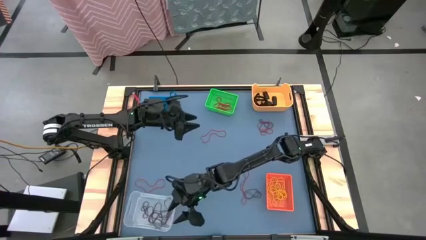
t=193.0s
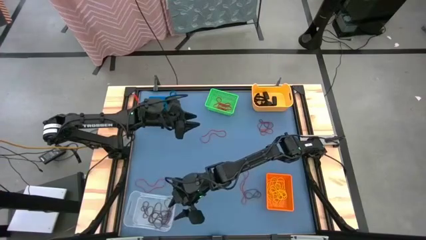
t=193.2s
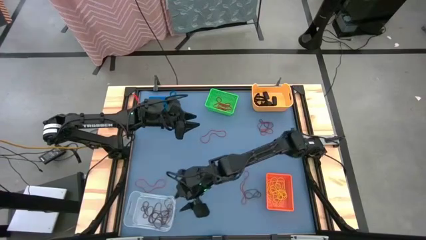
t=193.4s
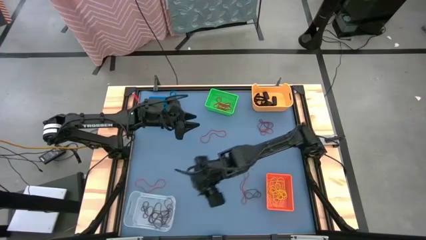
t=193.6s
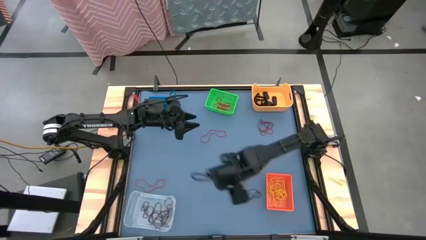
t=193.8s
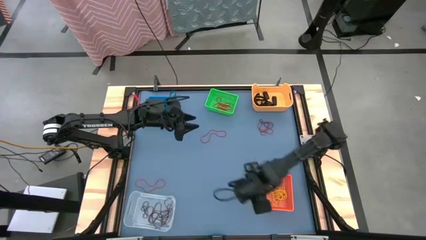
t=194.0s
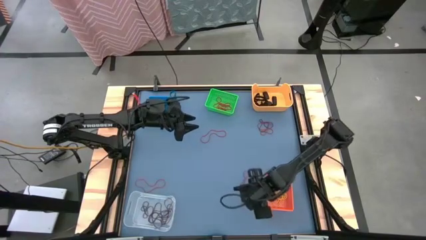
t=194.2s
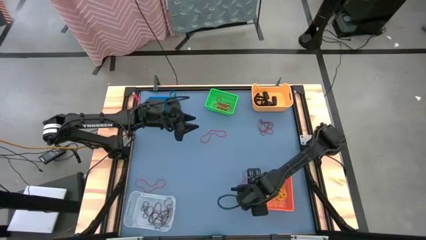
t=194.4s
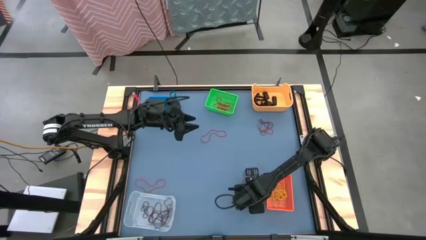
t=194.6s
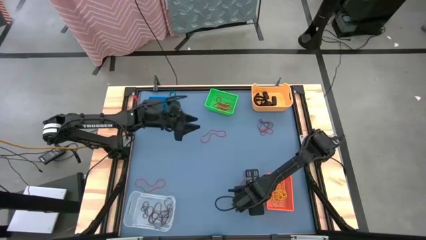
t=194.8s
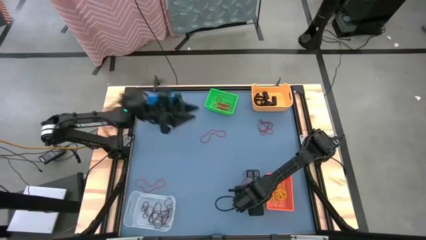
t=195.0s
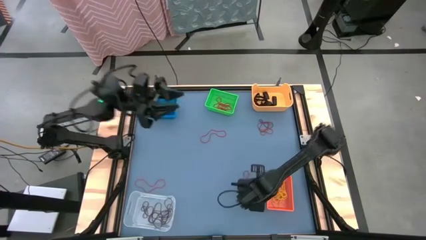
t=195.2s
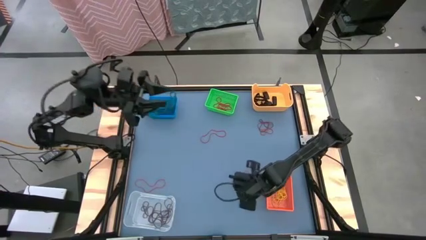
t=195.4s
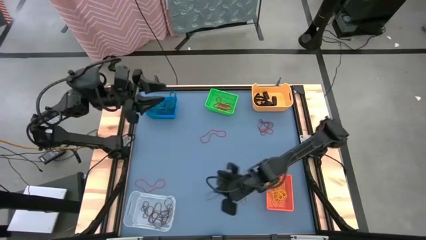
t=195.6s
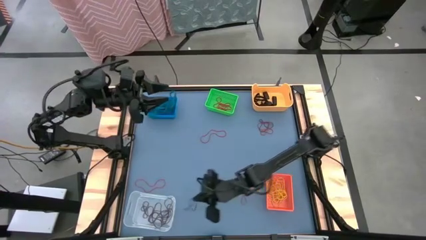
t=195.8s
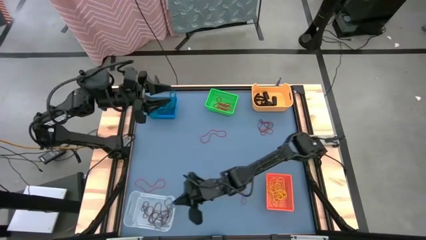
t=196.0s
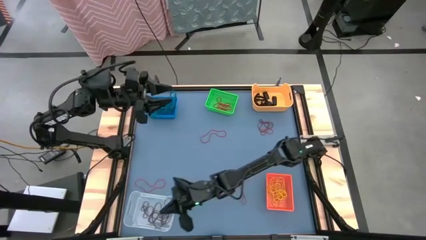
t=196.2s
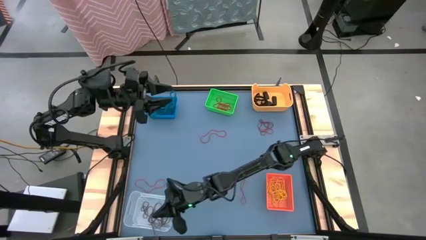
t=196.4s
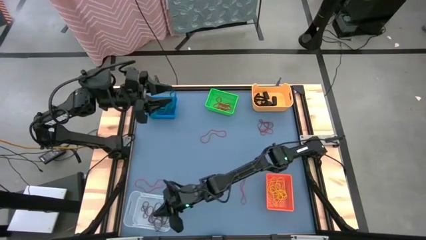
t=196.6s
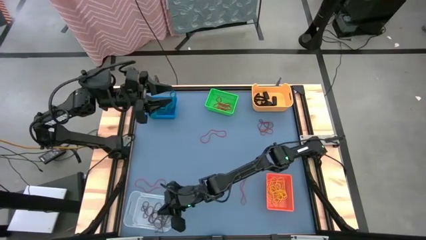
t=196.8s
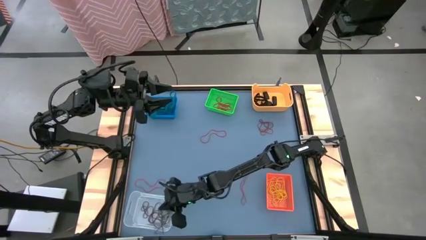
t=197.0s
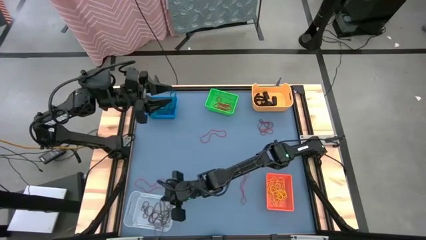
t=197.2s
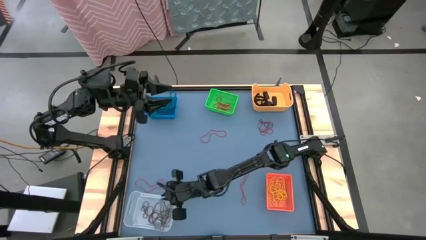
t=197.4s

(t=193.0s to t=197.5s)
Task: Sort rubber bands into baskets
Put the brown rubber band into the transparent bin

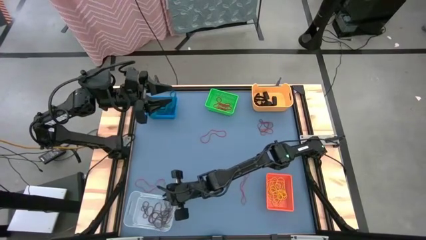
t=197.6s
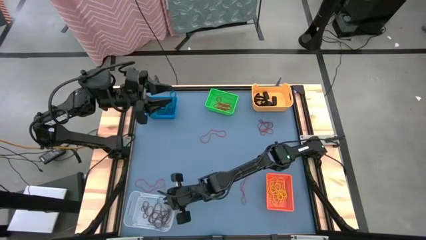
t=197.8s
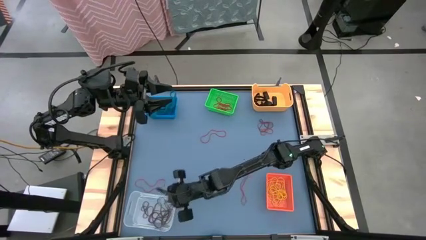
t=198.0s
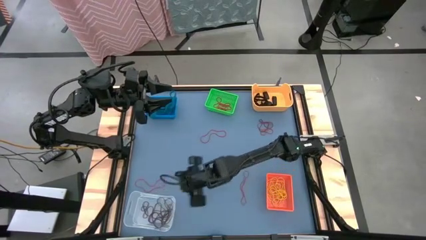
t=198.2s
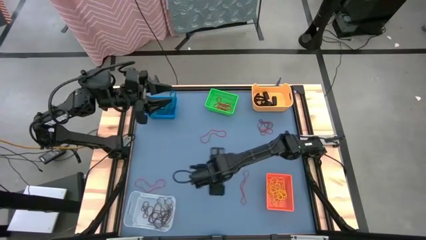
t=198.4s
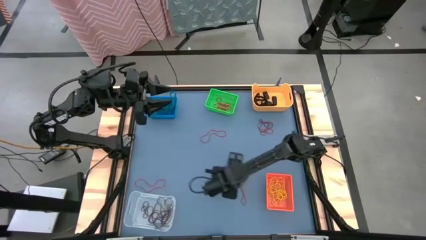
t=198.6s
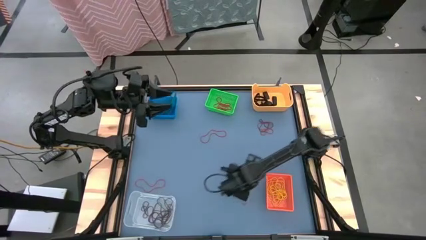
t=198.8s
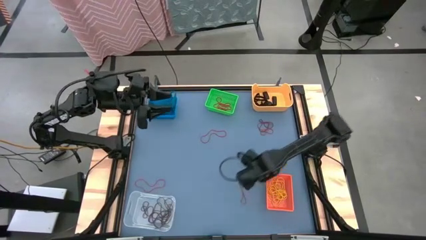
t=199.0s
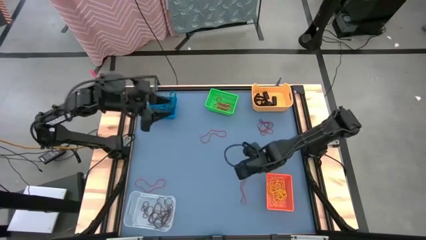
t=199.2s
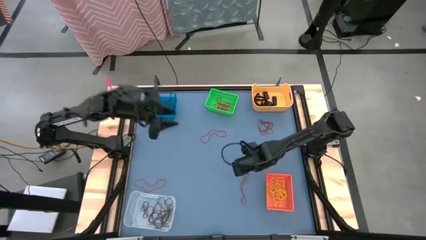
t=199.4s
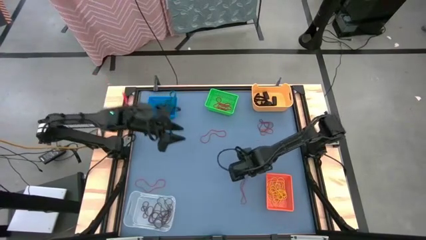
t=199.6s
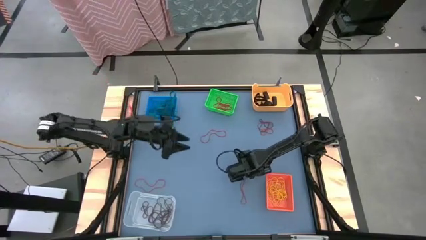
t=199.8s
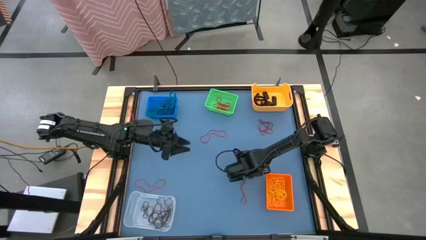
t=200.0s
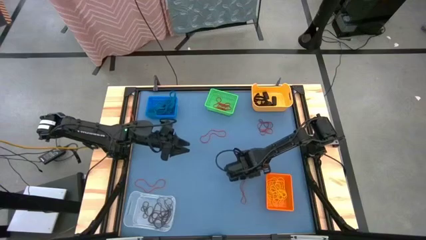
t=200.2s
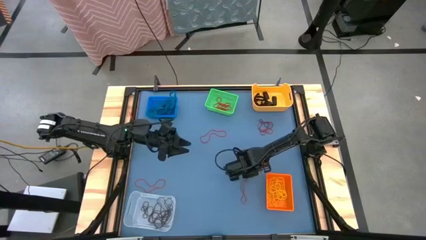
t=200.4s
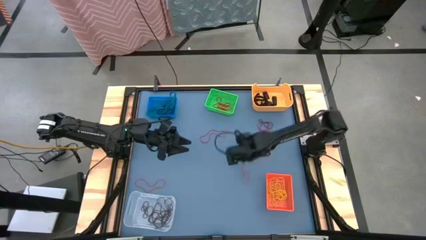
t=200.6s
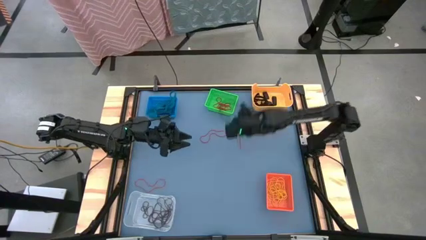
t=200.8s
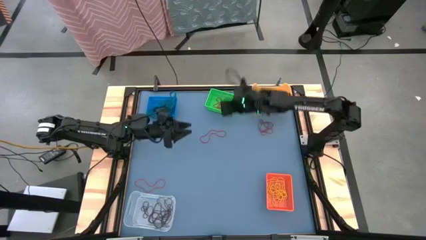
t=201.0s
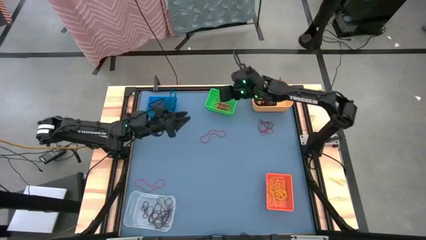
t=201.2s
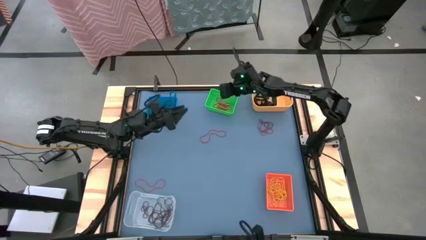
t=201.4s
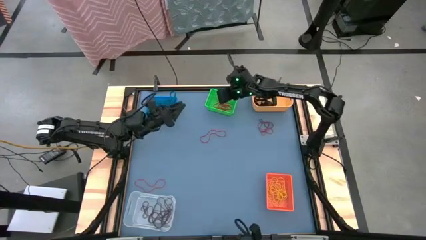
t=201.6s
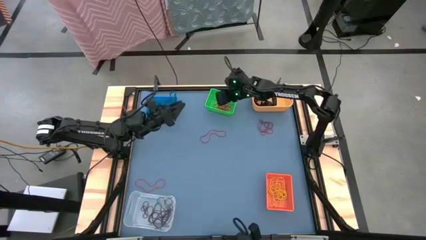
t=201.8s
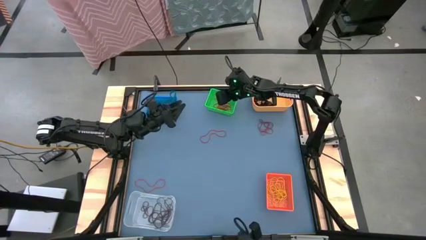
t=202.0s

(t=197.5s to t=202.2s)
Put the red rubber band into the green bin

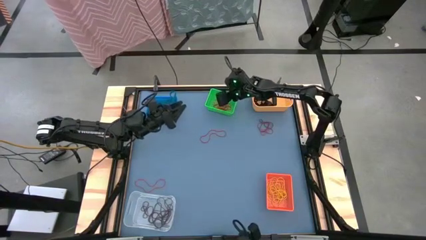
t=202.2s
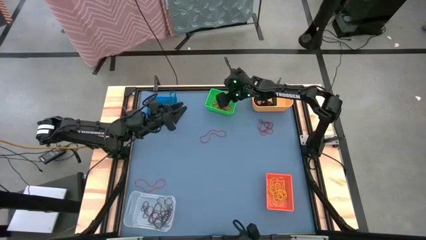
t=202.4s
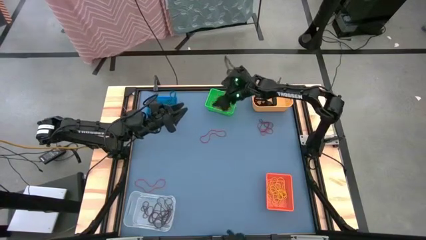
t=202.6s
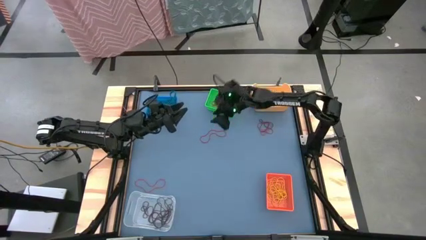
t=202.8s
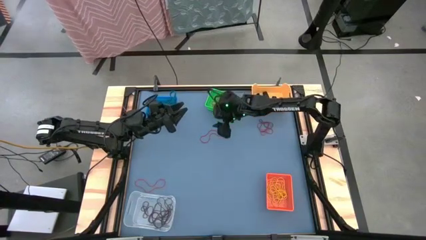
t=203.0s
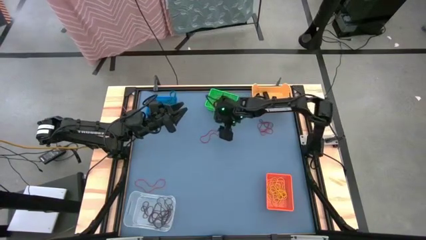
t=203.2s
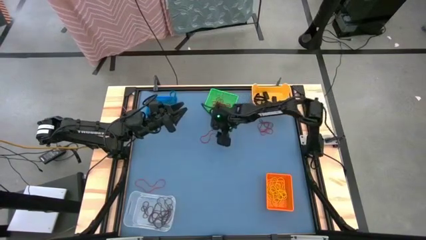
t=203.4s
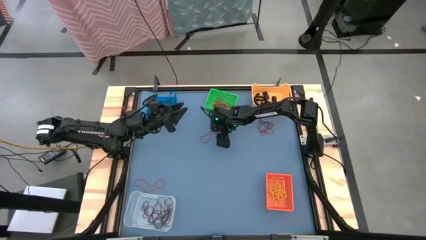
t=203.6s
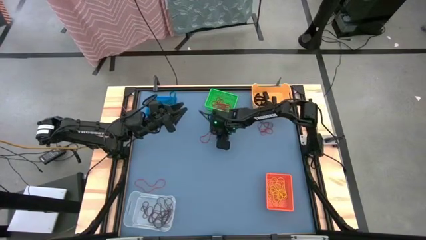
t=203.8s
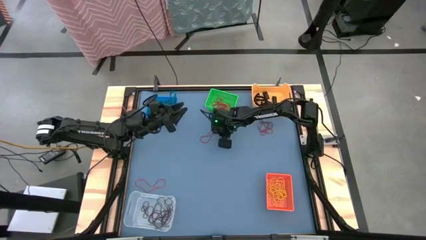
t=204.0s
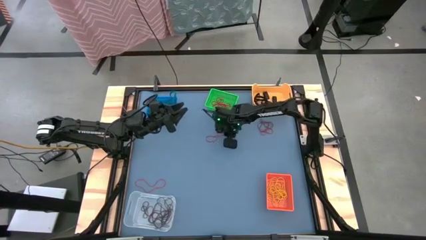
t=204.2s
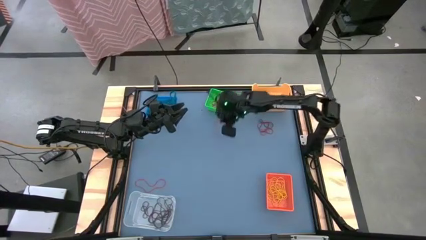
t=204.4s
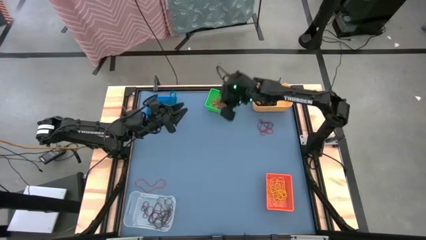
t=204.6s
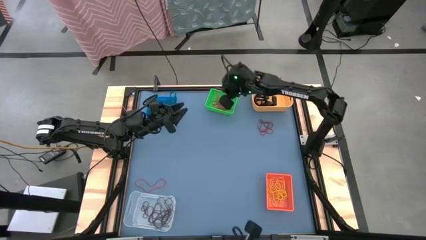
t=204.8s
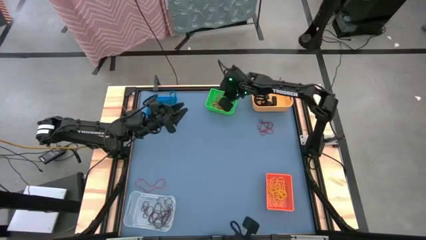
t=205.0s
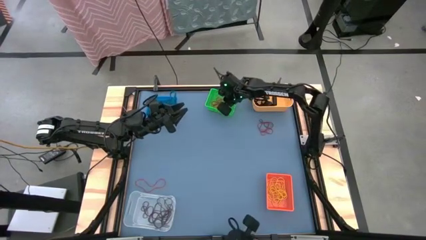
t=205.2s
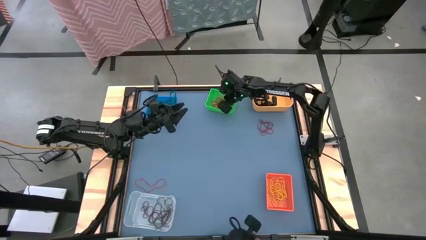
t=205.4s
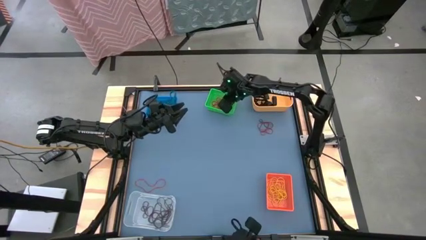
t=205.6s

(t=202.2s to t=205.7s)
Put the red rubber band into the green bin

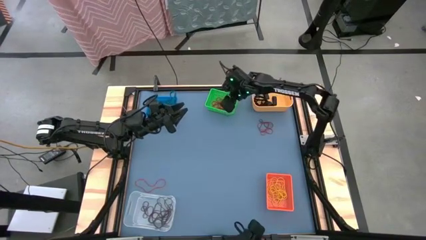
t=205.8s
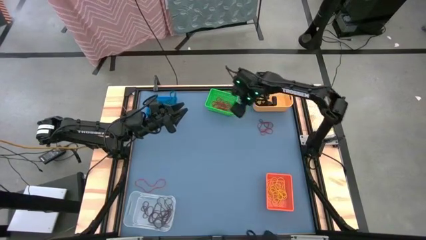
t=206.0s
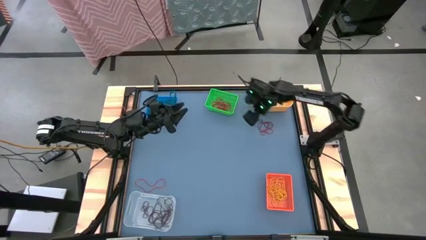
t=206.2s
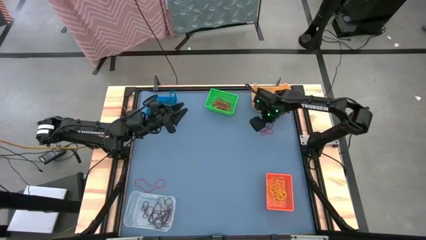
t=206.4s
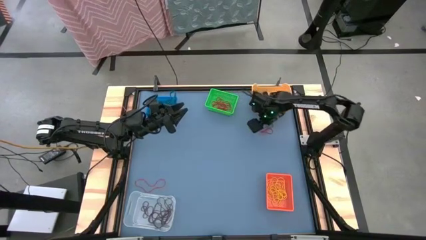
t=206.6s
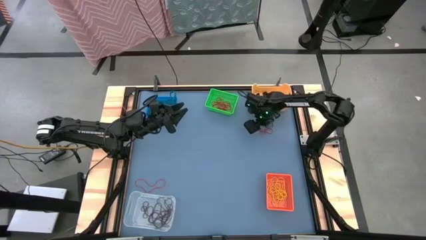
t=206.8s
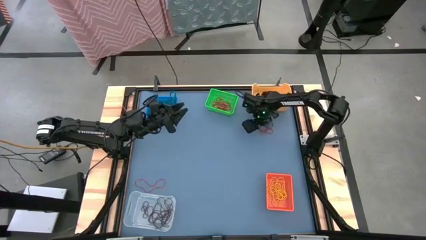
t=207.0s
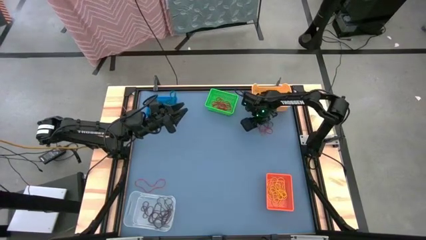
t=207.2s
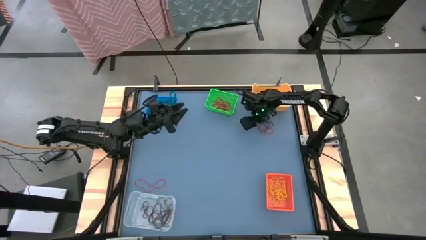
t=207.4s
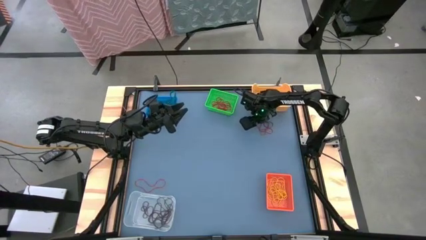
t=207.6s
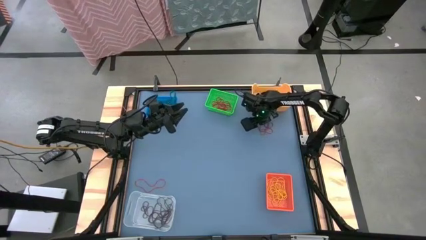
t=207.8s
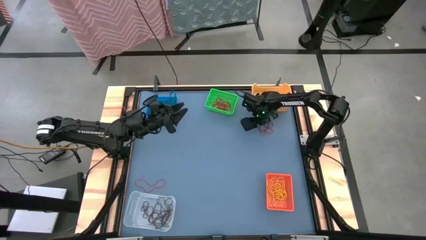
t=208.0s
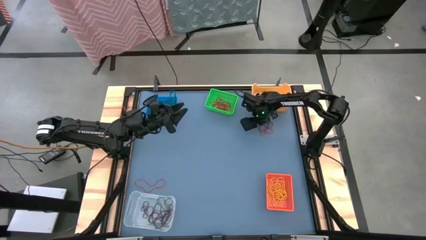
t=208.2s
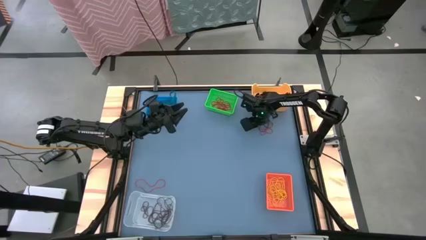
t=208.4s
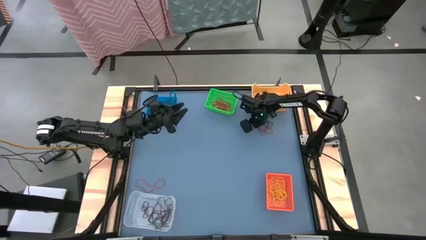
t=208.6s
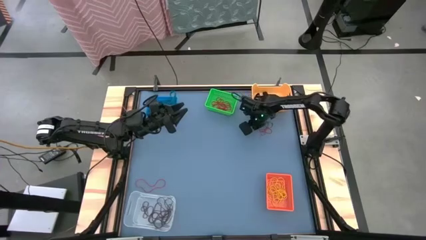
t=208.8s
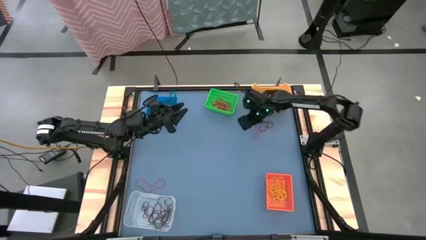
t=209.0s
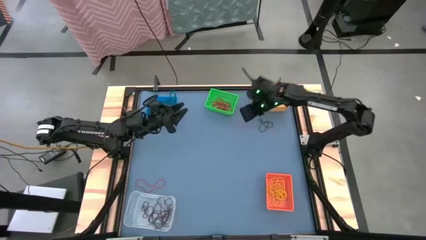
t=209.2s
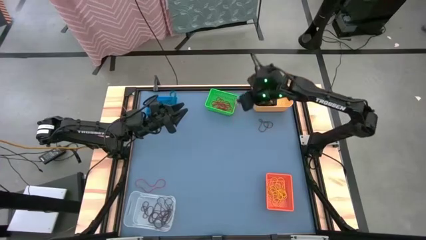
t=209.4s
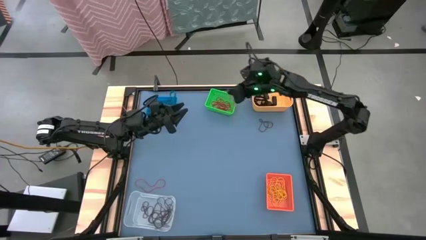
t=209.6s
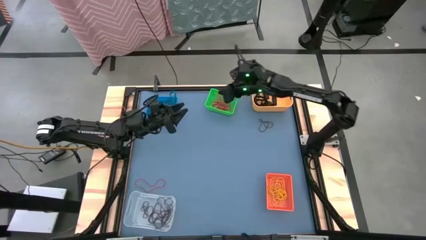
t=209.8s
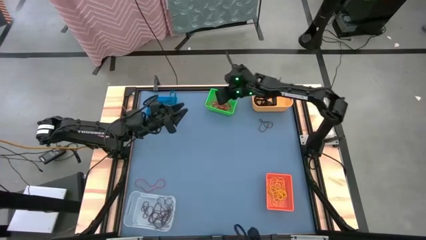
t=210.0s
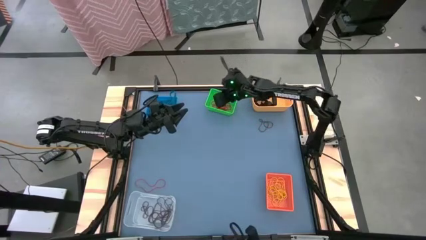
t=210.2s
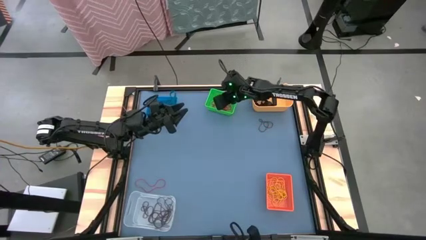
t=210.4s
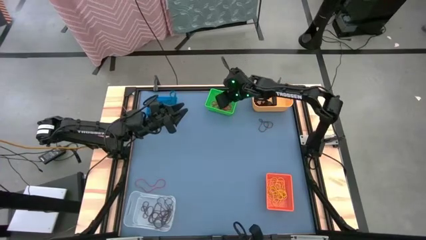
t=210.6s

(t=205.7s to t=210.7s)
Put the red rubber band into the green bin
